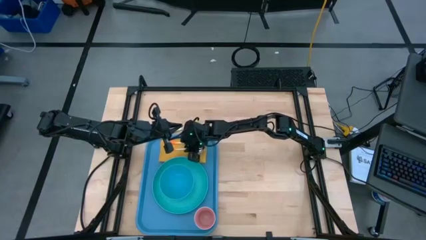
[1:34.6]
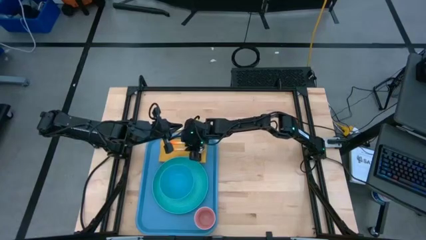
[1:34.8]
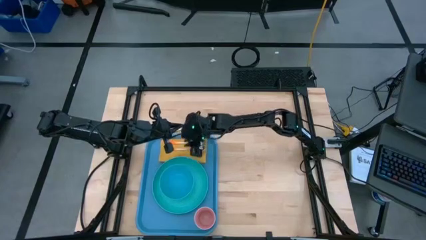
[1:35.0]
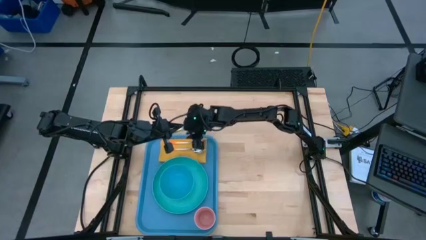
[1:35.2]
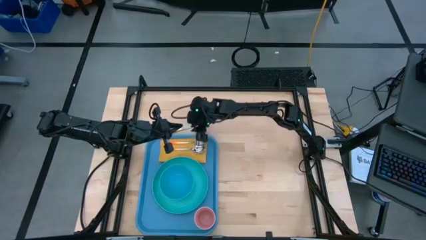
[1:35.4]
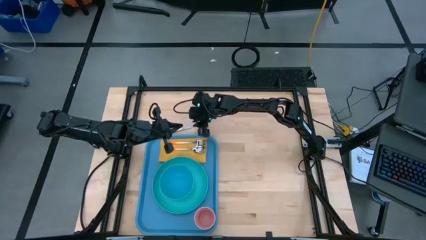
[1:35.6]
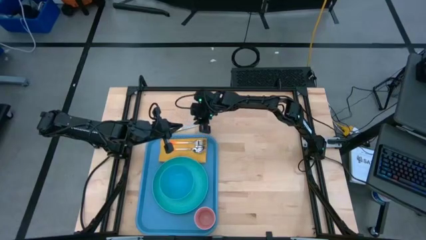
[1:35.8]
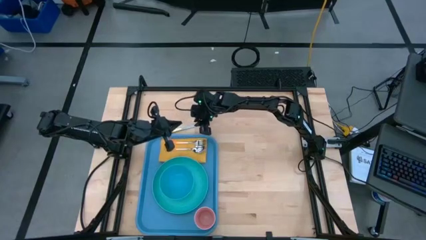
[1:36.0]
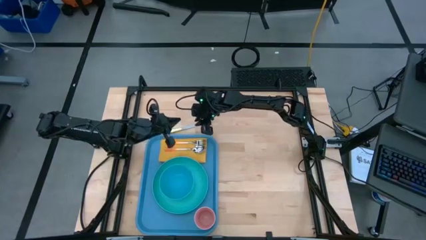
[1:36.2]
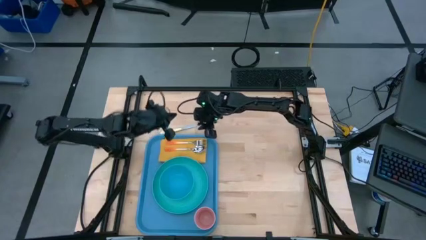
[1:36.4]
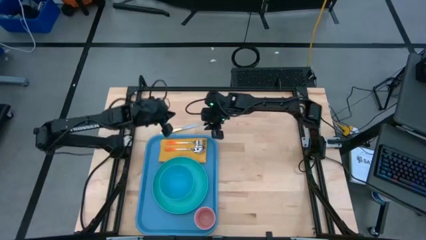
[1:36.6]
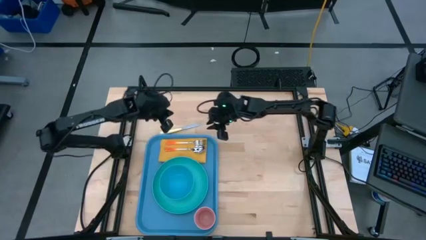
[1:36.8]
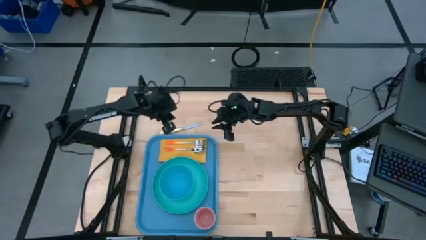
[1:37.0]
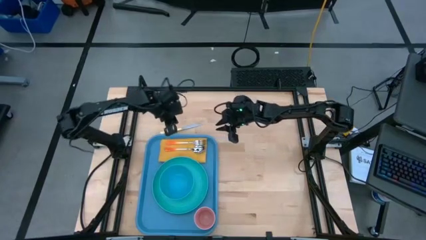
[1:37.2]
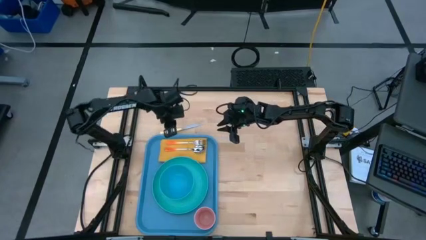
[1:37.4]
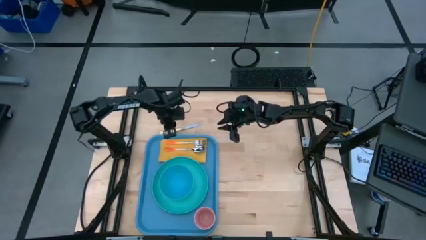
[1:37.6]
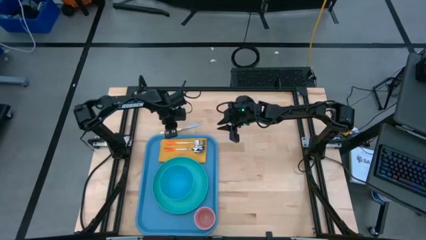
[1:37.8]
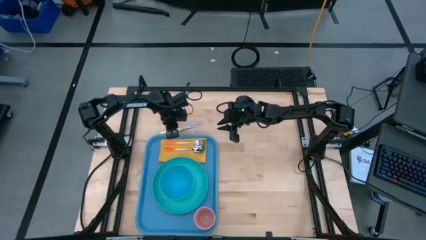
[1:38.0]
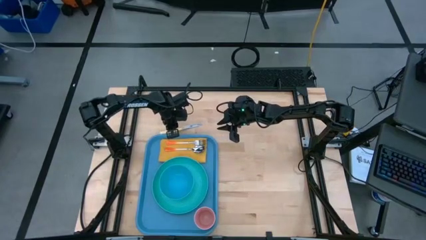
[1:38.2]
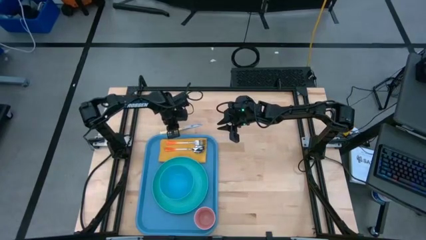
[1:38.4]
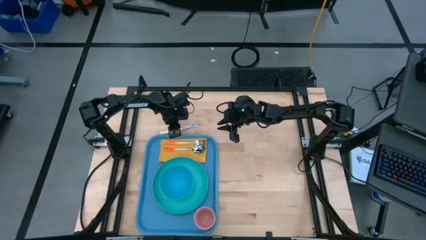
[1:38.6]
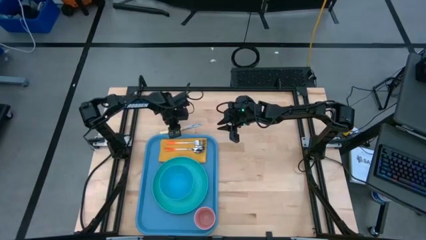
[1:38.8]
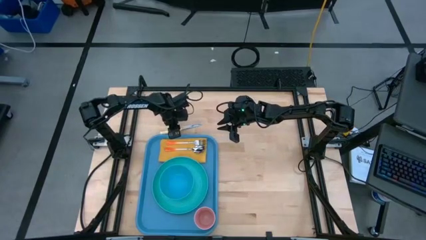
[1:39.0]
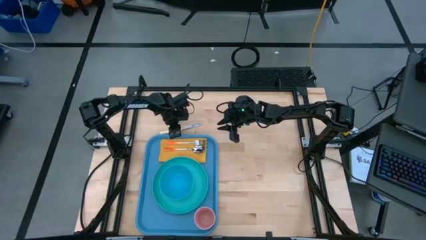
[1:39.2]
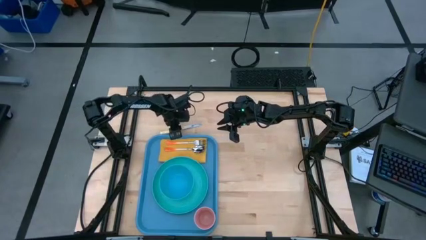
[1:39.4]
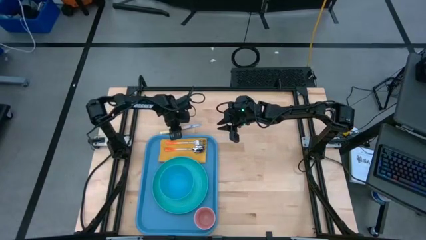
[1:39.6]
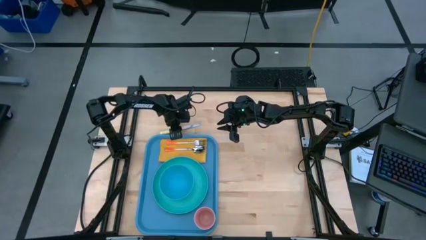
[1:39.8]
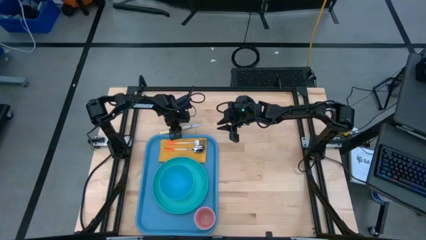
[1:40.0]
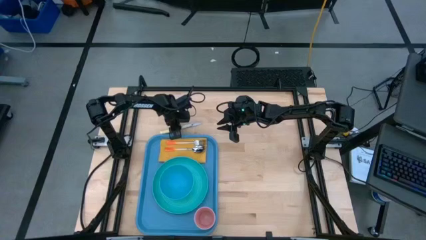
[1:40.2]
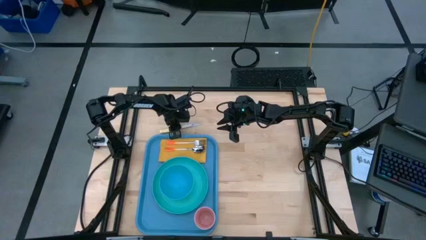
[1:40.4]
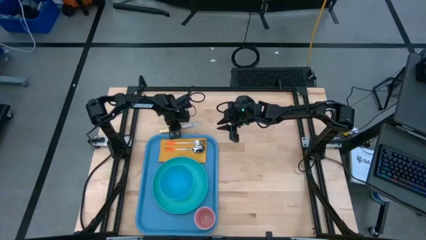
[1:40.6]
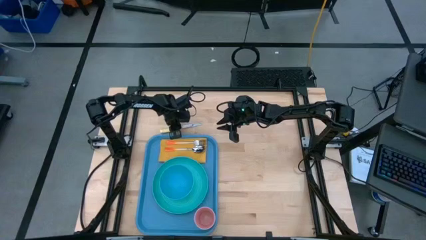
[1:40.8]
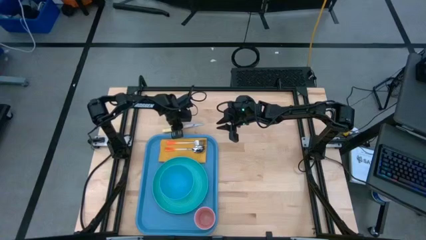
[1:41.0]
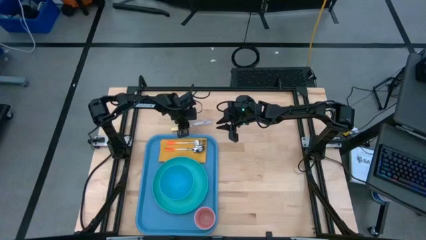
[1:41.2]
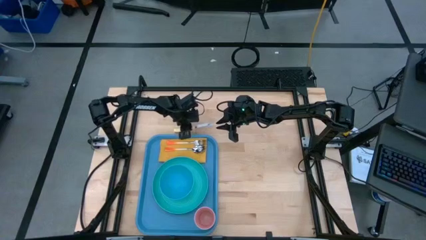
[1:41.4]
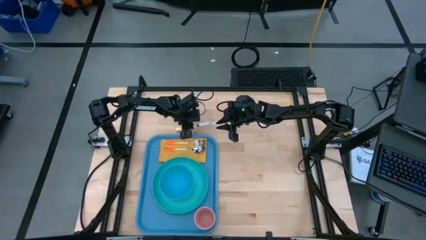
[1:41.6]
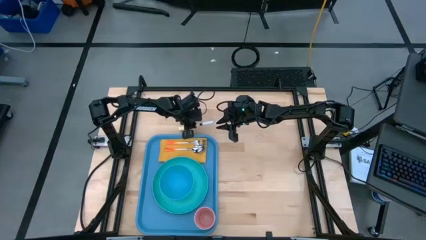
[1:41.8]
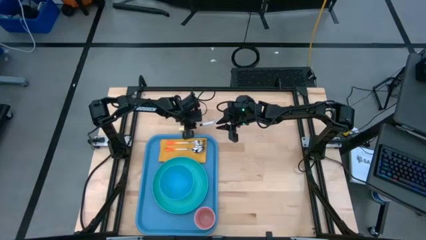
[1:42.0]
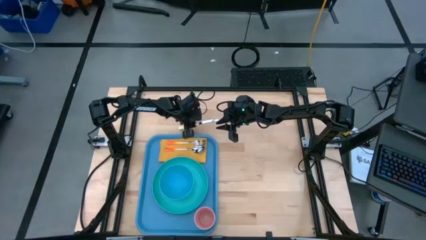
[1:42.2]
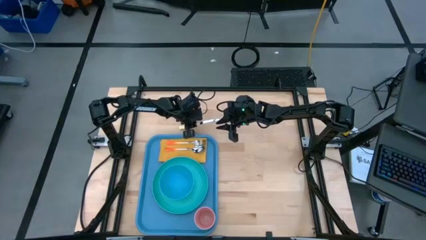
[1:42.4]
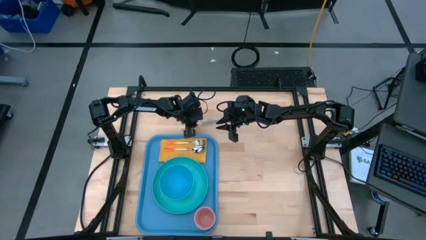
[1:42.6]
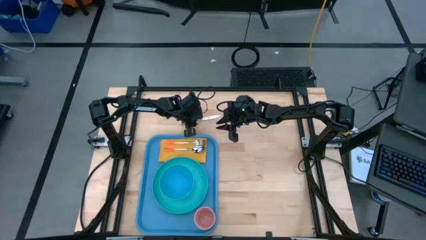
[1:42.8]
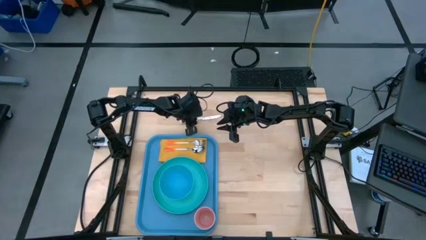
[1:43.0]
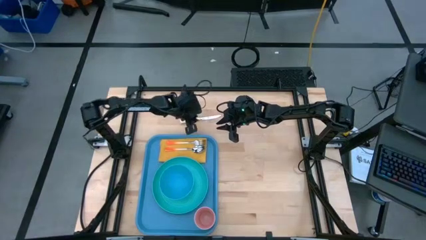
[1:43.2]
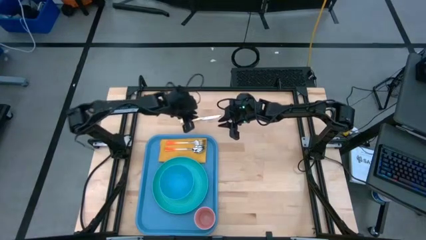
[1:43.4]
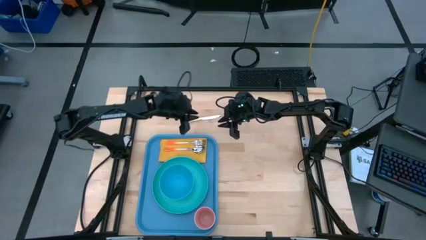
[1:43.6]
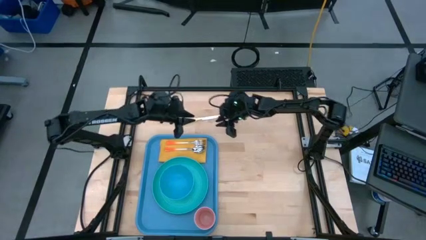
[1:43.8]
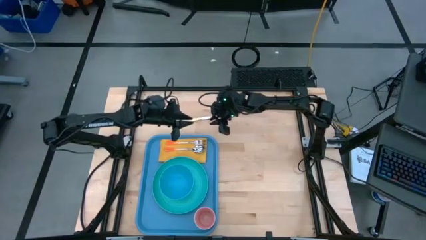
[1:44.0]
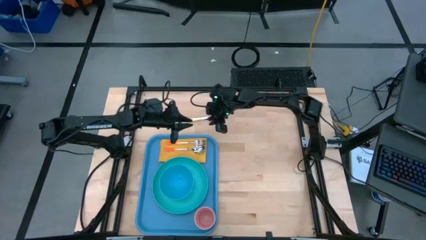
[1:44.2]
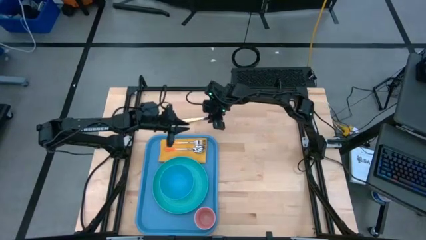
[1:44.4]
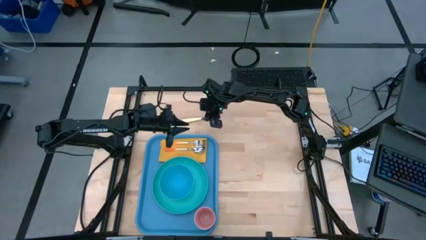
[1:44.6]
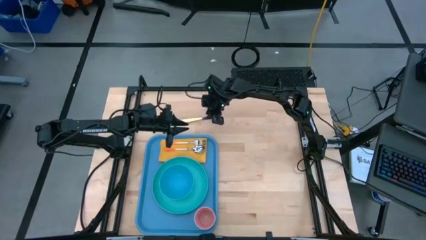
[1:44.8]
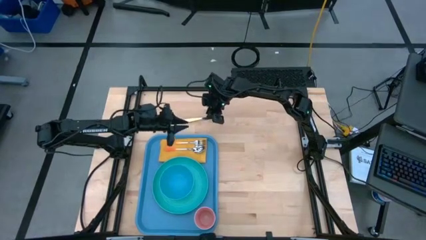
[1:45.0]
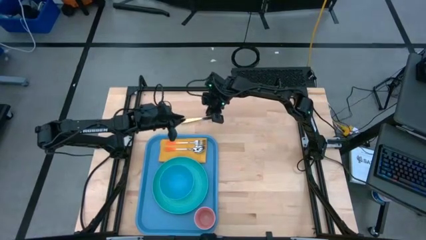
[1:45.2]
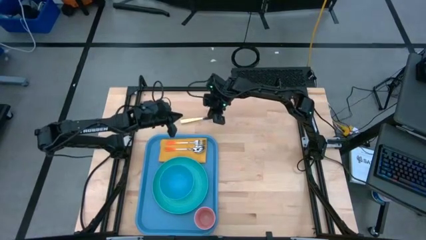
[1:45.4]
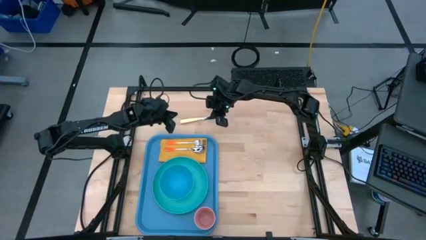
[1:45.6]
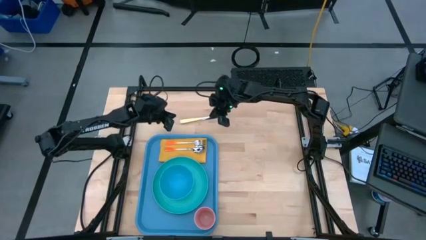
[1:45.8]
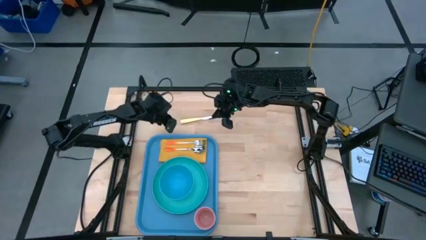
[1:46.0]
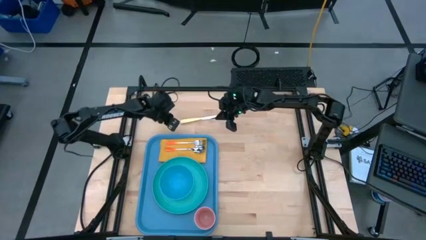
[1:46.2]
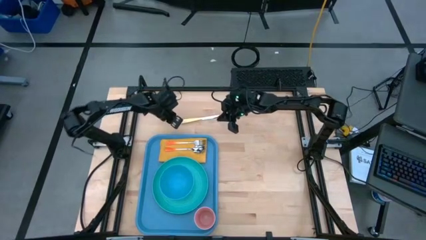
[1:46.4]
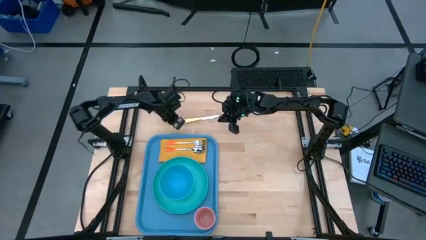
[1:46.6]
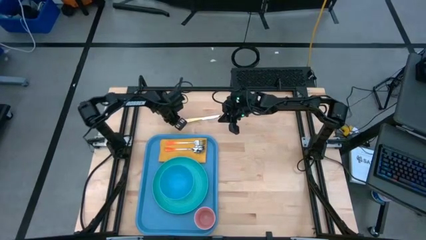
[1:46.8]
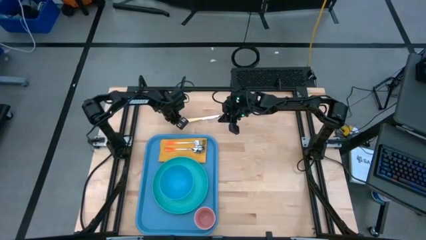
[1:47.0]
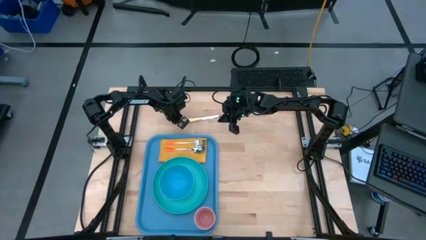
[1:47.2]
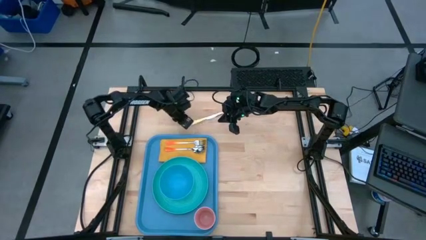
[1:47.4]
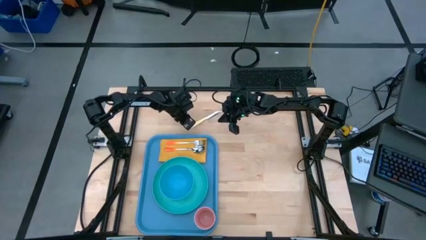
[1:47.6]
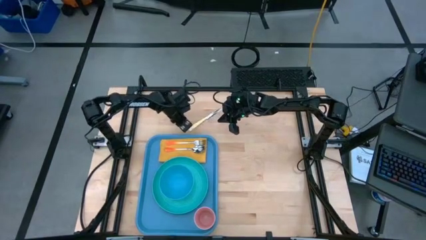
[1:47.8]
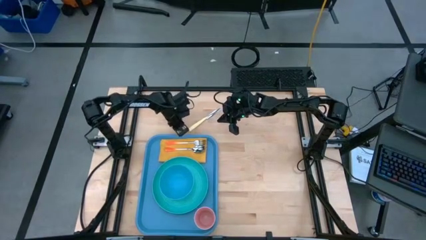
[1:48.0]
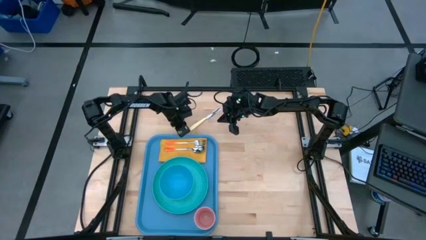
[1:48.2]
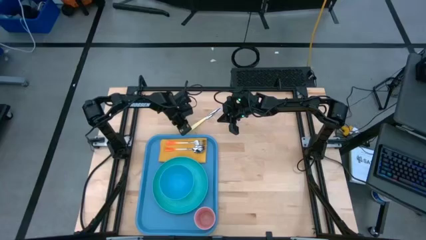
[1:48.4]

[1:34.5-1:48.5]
Task: Set up tray
Put the yellow knife to the bottom of the orange spoon on the yellow napkin on the blue serving tray
